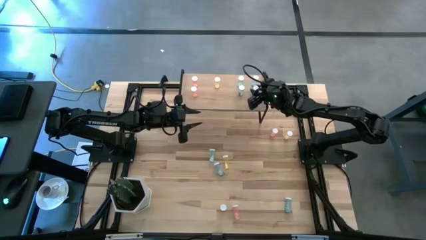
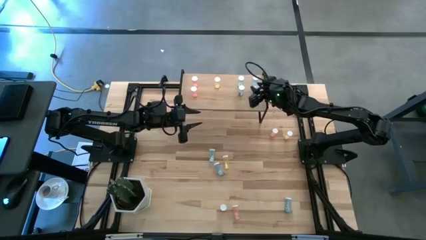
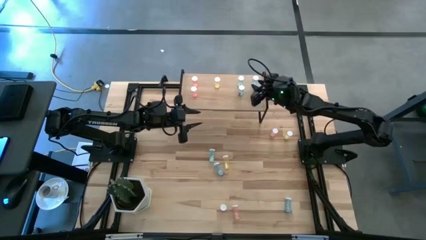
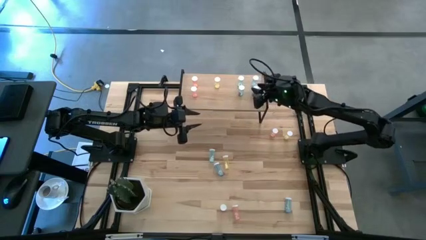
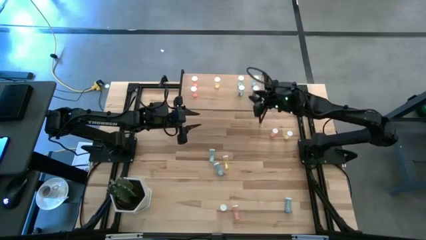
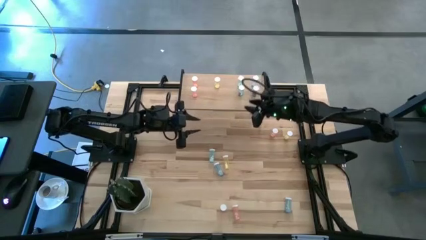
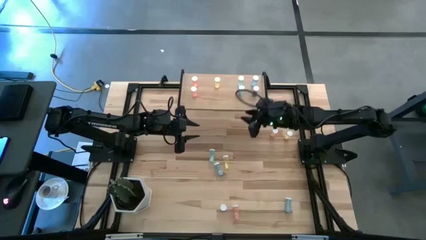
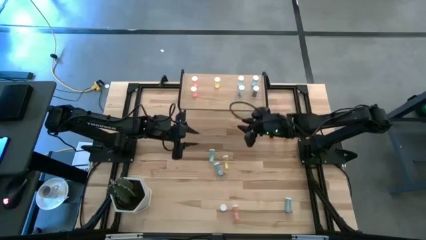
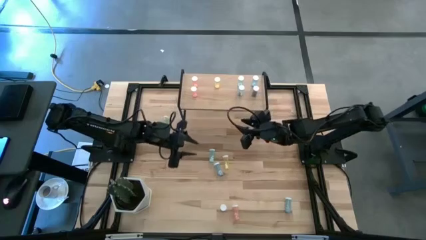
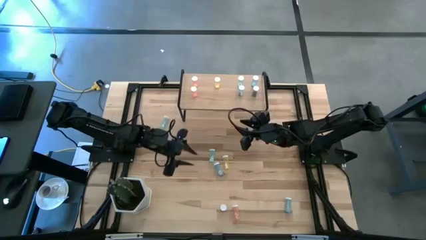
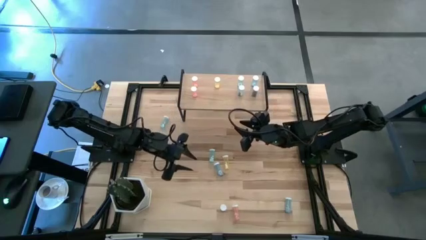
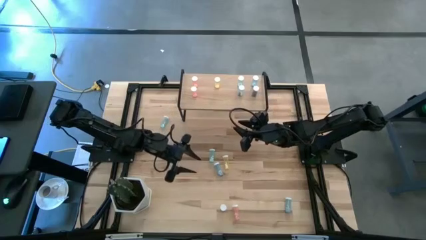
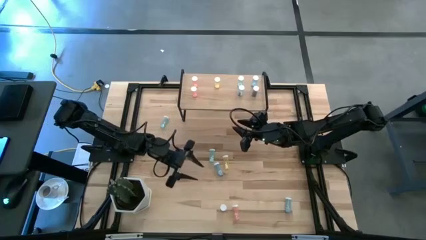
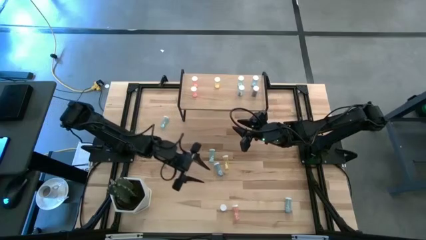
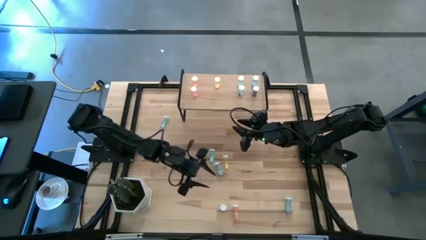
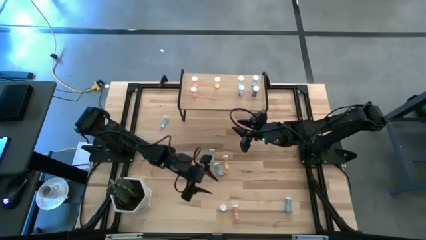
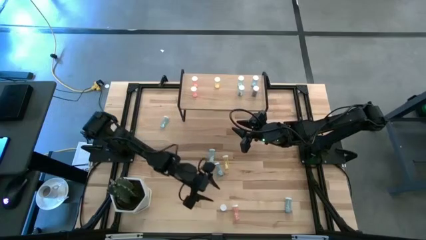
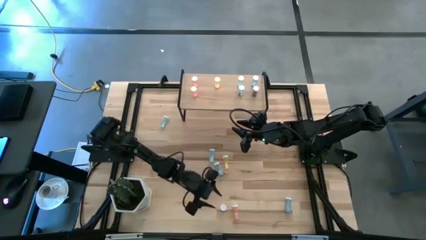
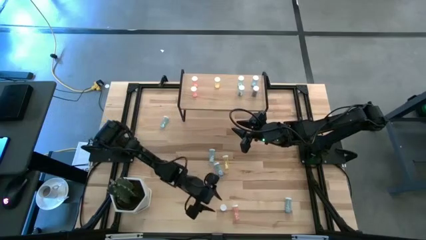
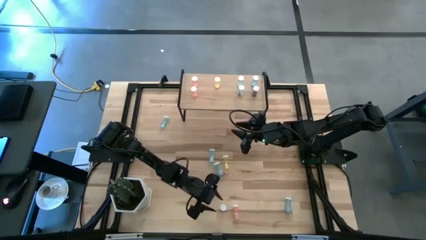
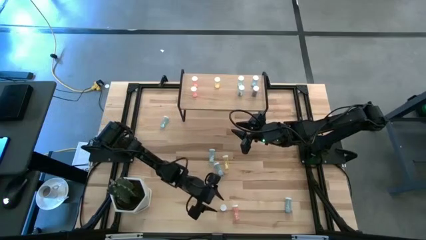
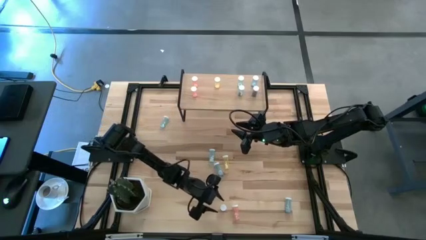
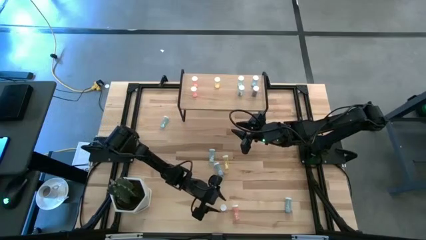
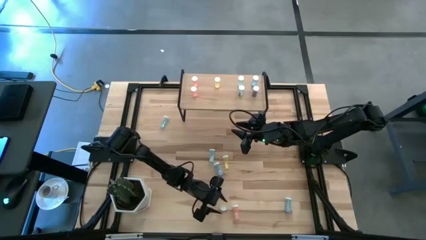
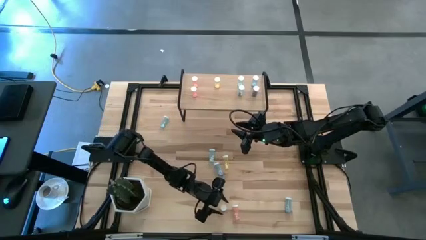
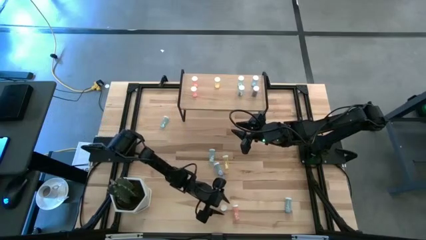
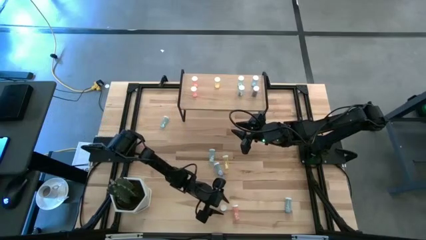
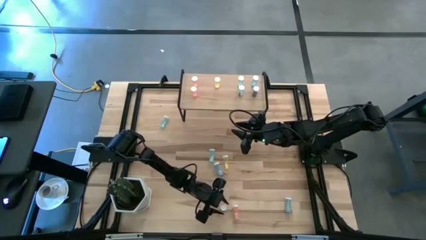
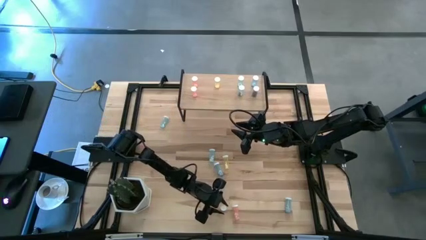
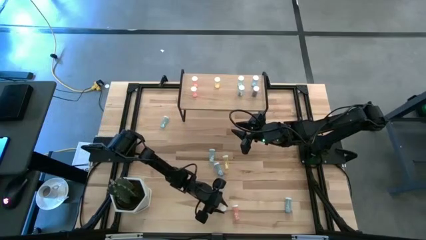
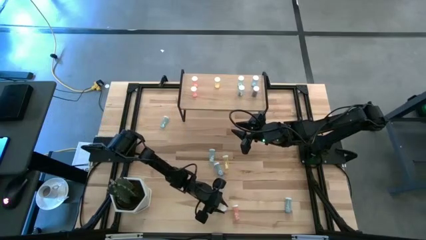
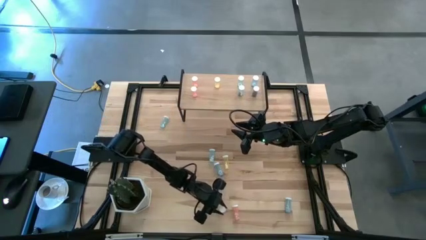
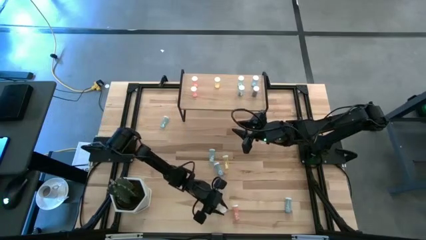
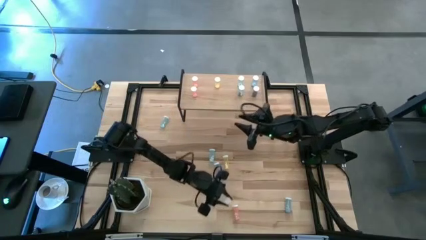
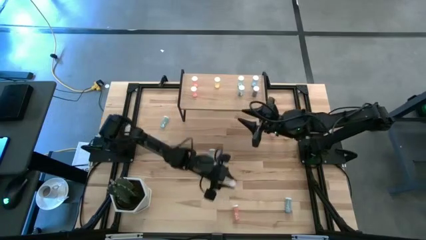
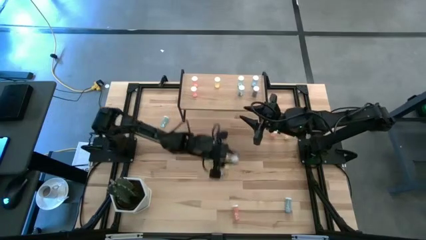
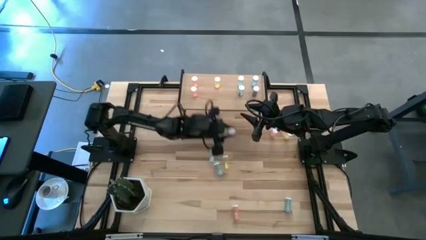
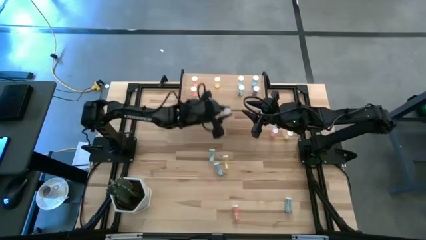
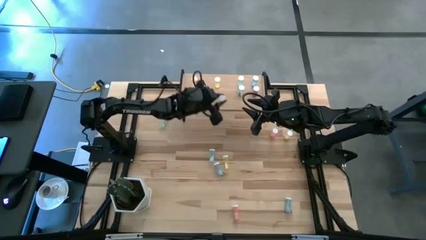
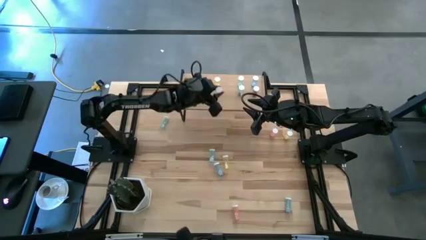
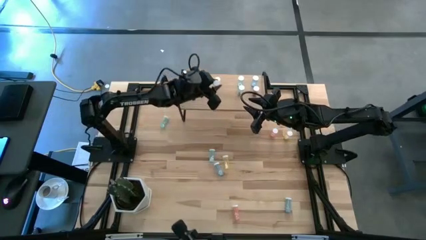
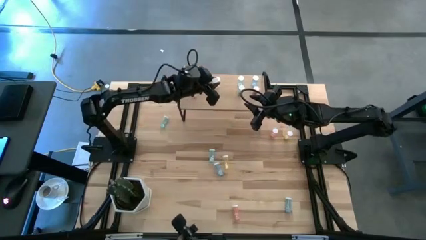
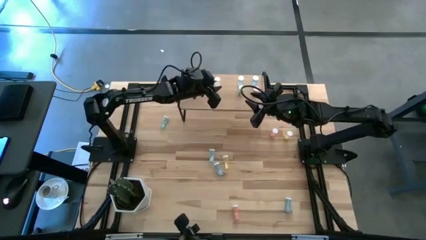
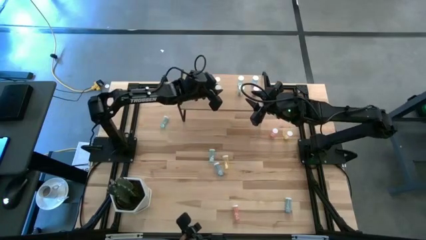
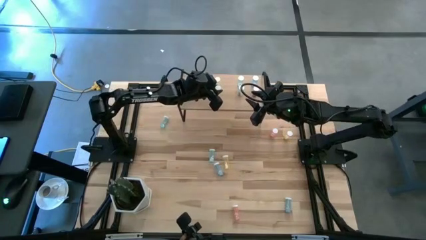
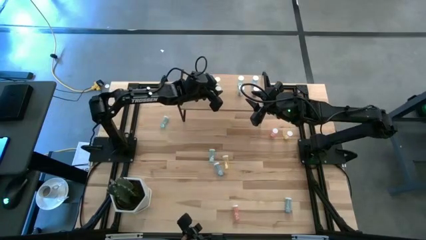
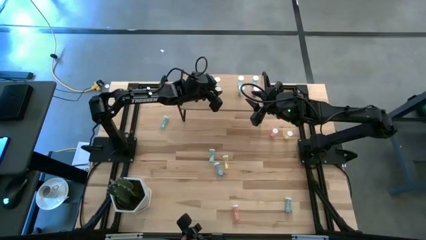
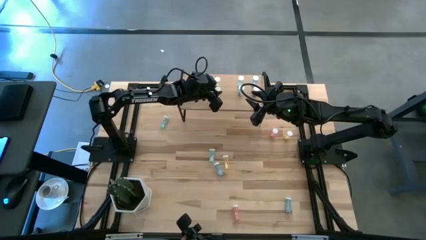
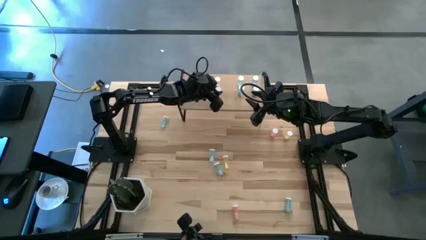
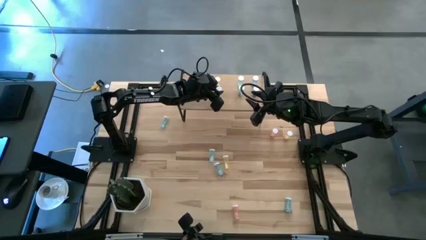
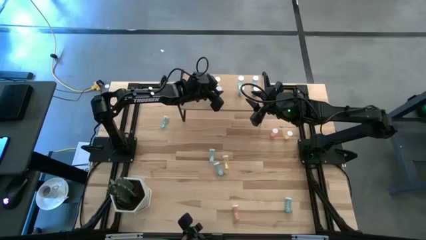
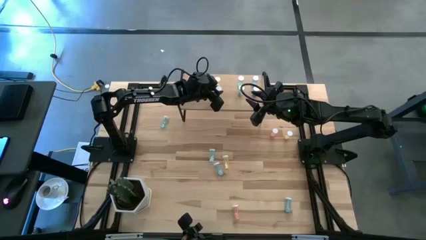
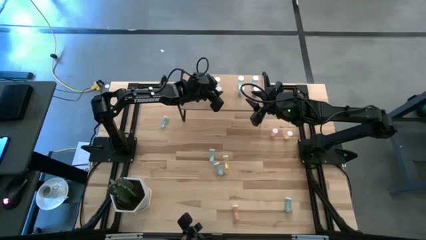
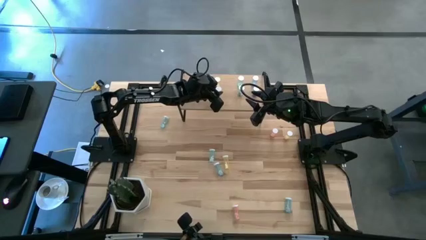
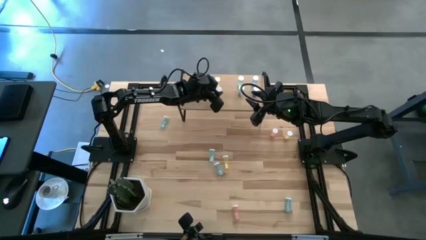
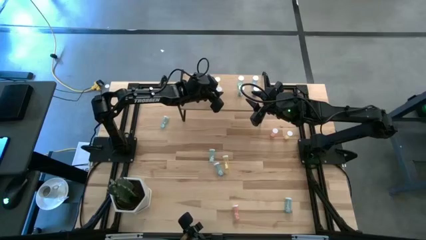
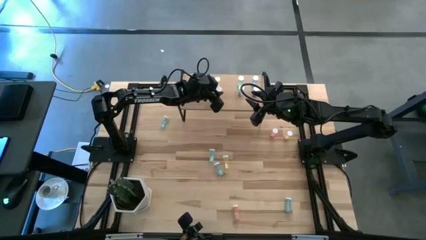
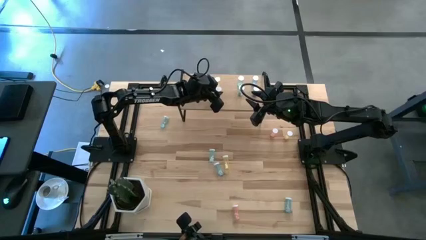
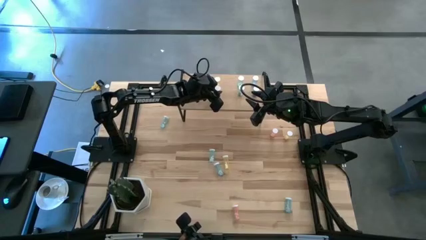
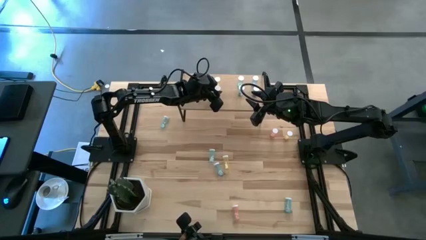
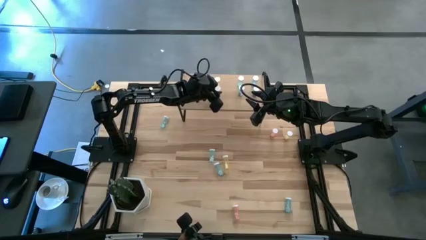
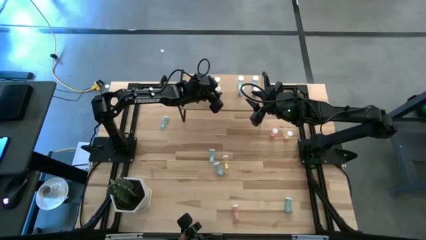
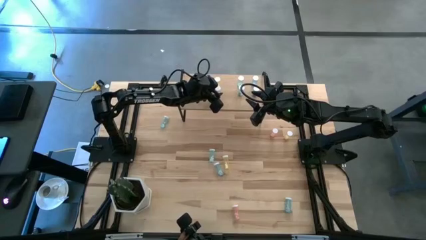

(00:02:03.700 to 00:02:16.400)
Task: Pick and place medicine bottles onto shelf by color
Put the yellow pill bottle on the shelf aligned with the other yellow pill bottle
